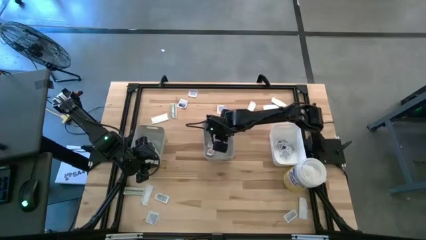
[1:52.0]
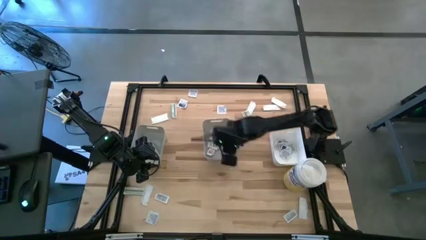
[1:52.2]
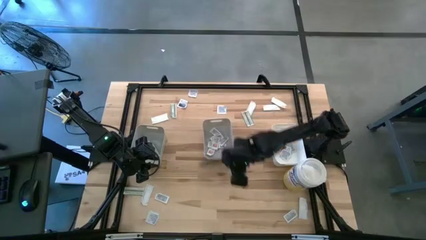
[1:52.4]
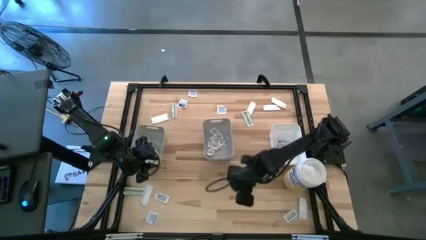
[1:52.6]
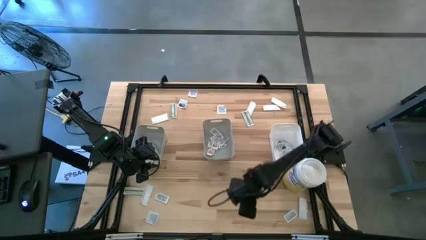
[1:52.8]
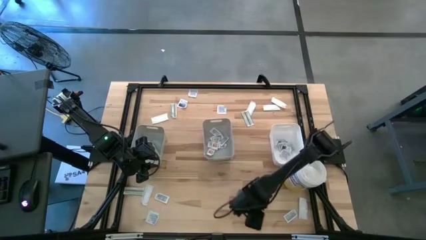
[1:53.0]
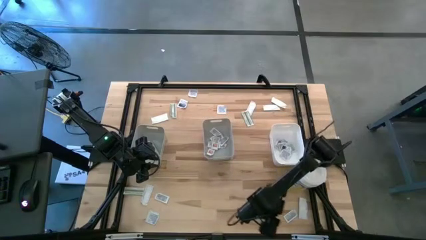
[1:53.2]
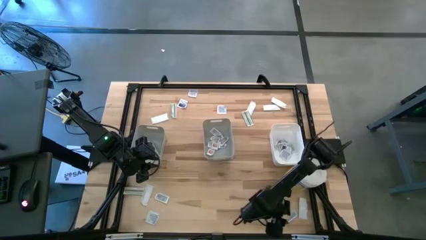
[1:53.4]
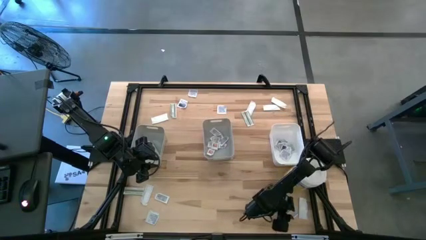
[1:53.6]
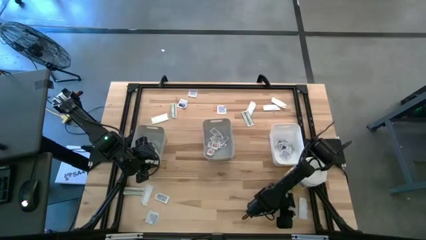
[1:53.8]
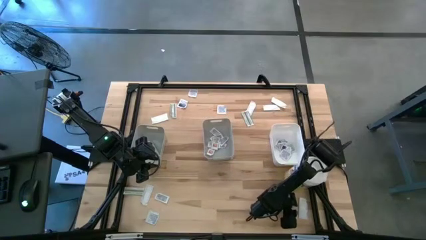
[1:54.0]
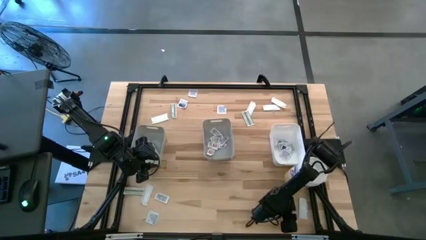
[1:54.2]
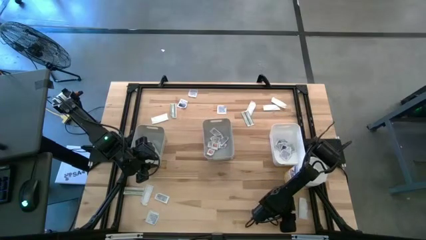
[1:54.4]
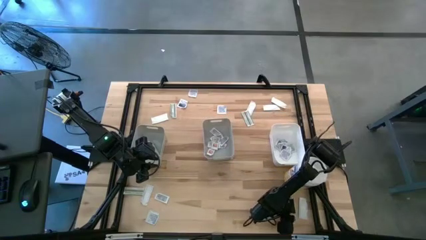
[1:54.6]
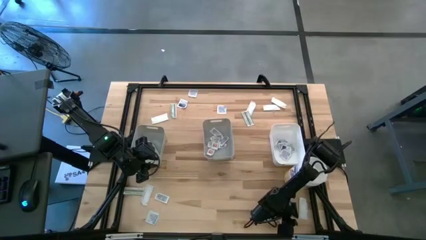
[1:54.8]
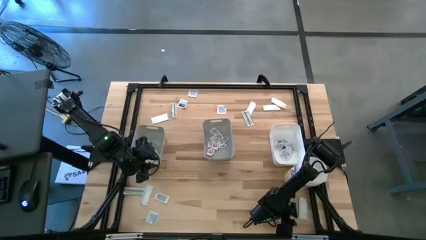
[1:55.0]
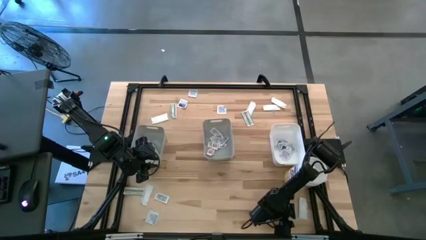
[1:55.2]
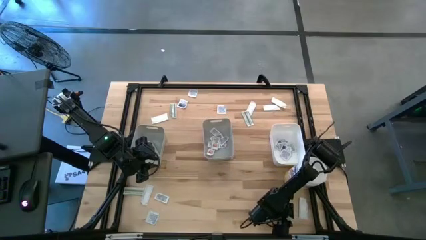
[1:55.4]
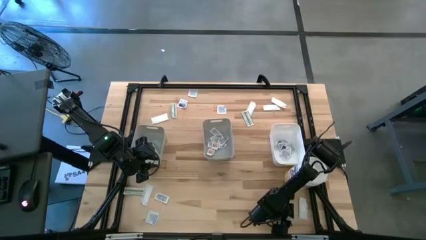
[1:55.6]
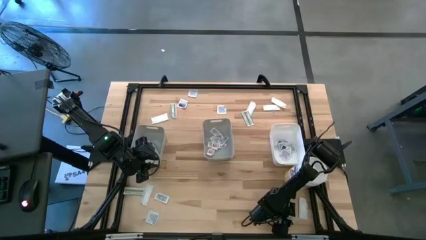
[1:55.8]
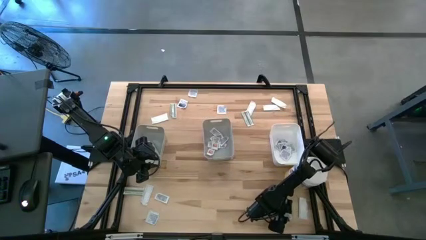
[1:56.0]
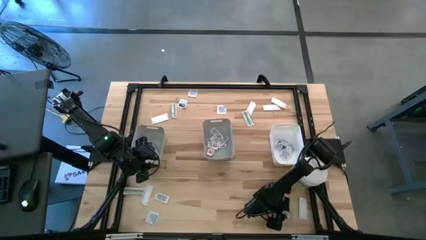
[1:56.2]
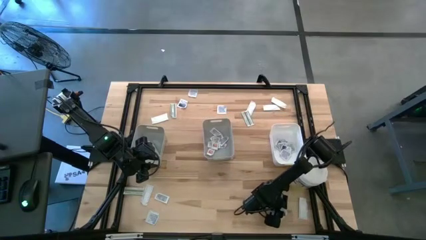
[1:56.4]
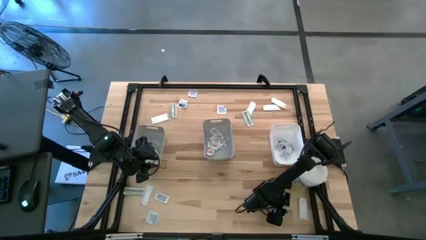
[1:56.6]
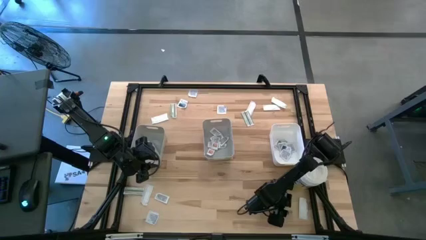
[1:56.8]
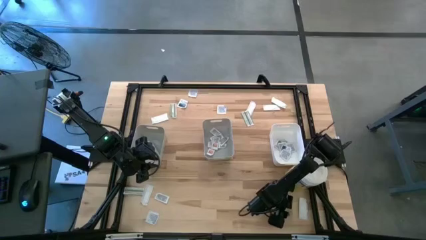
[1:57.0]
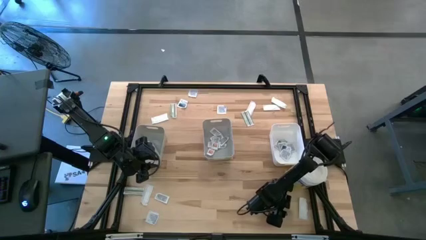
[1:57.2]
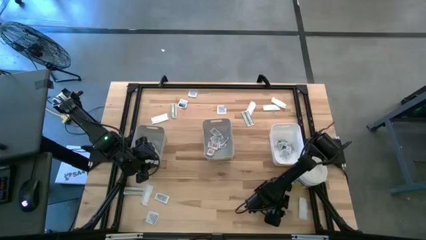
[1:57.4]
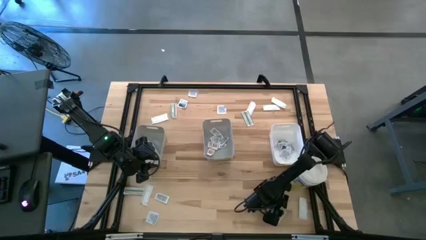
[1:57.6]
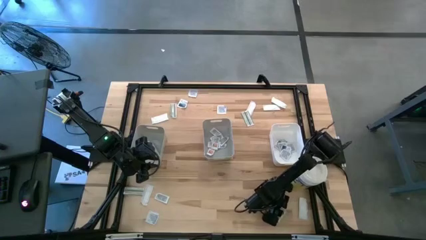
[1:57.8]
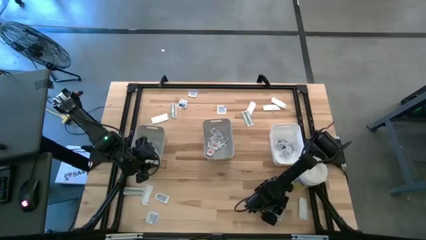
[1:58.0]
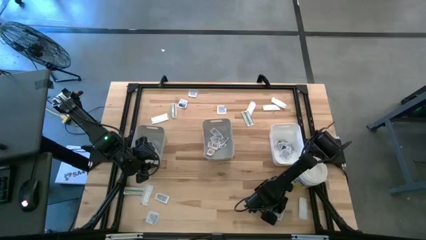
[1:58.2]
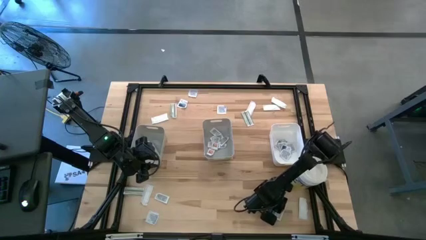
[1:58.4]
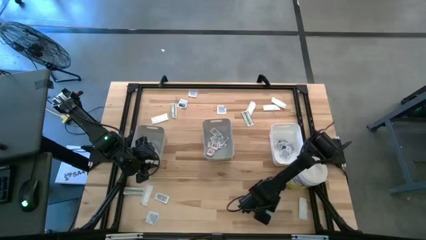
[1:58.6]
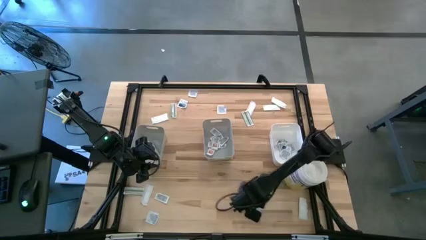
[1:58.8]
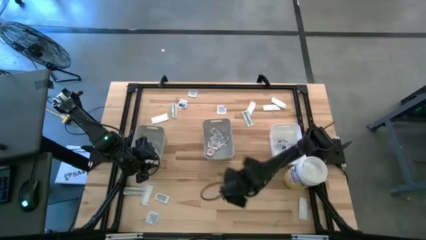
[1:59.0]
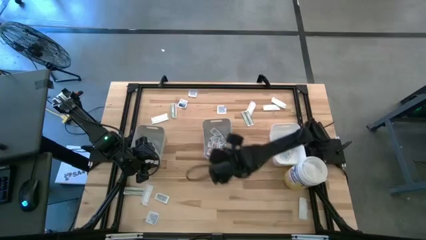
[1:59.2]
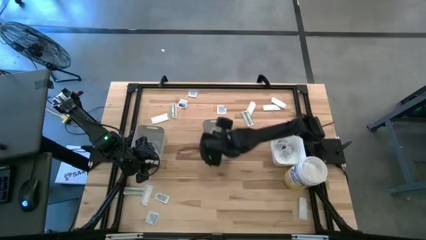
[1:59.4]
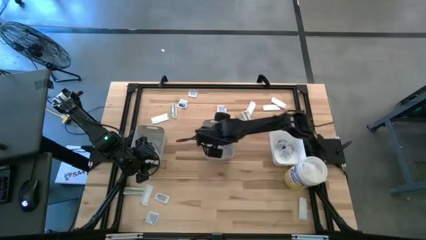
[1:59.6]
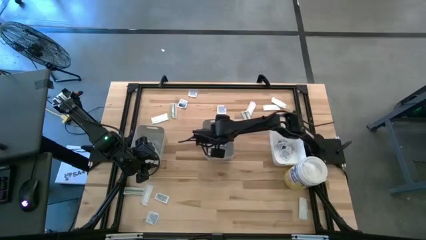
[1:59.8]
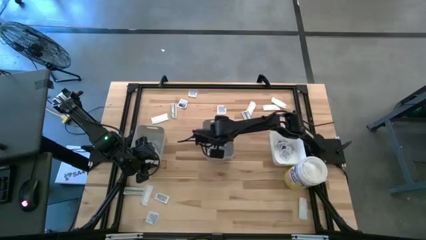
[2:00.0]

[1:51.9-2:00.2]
Task: Pick & Place First Aid Supplies
Put the ointment pack into the right gray bin

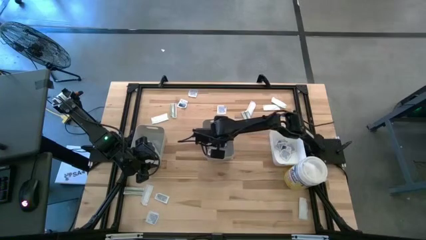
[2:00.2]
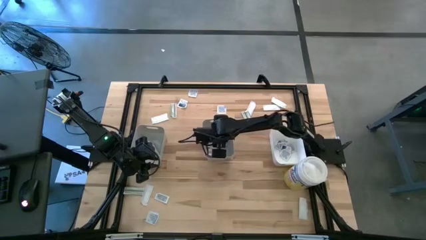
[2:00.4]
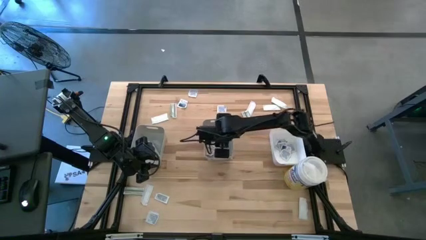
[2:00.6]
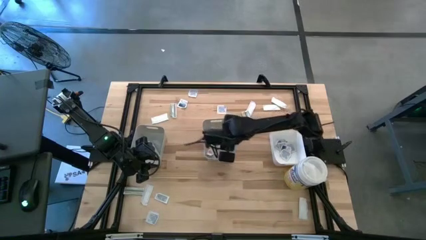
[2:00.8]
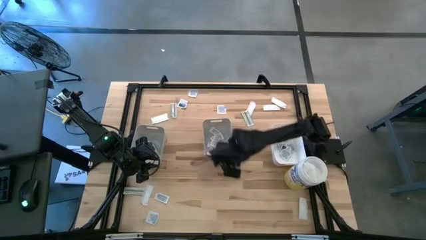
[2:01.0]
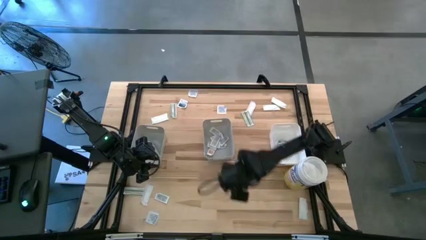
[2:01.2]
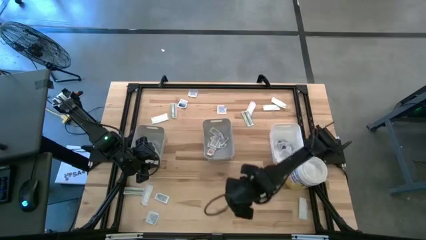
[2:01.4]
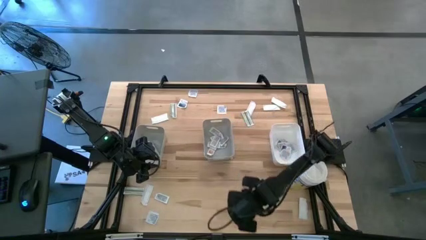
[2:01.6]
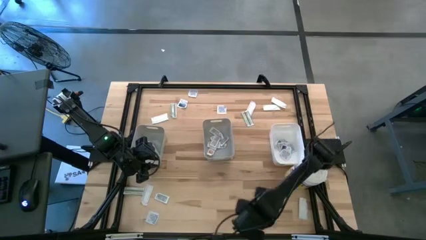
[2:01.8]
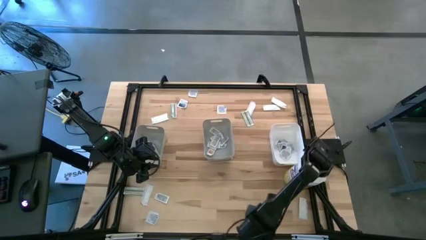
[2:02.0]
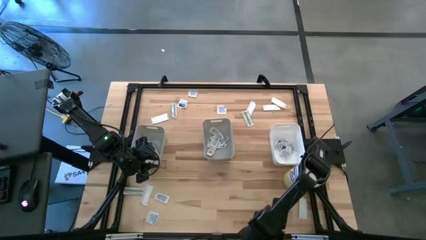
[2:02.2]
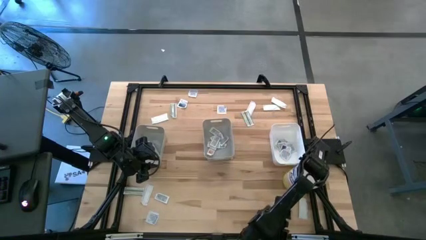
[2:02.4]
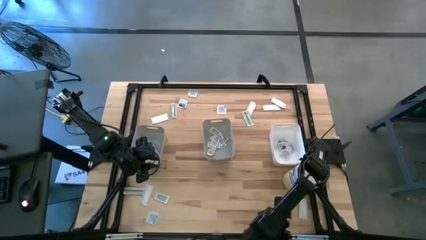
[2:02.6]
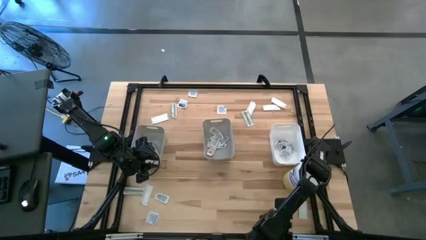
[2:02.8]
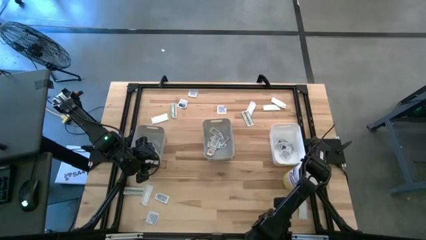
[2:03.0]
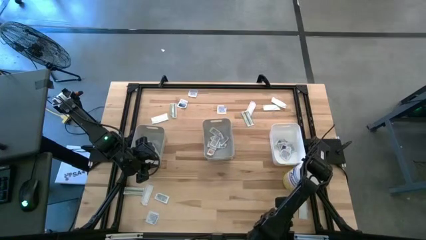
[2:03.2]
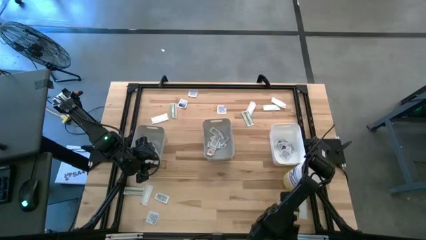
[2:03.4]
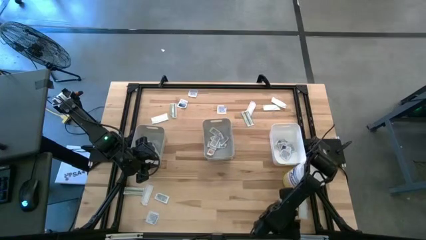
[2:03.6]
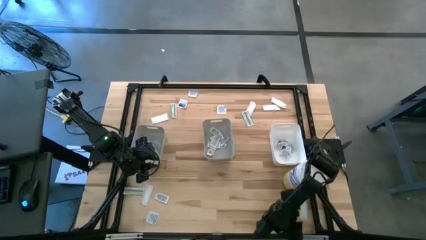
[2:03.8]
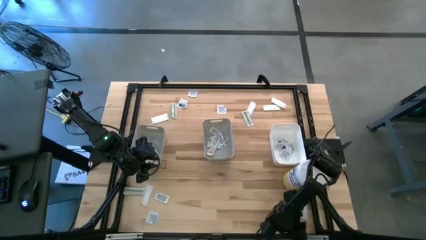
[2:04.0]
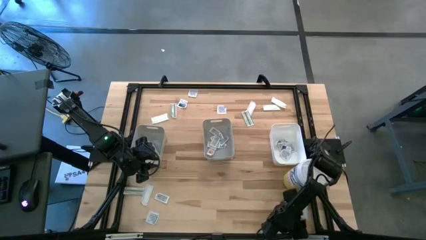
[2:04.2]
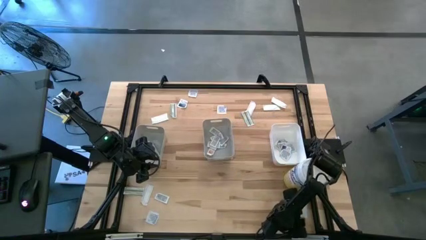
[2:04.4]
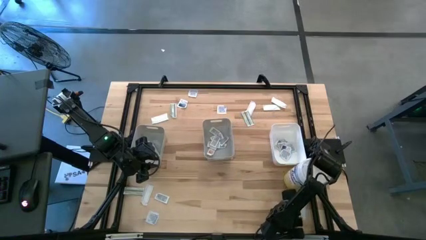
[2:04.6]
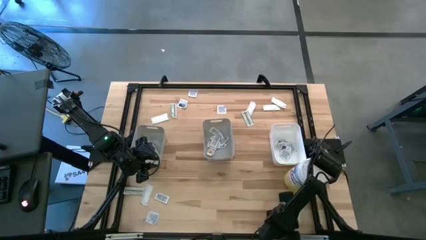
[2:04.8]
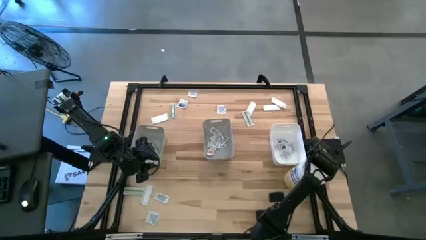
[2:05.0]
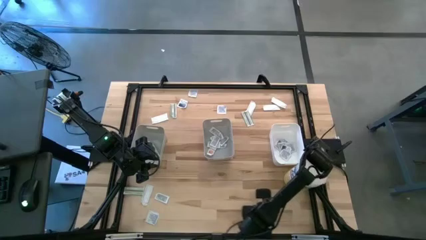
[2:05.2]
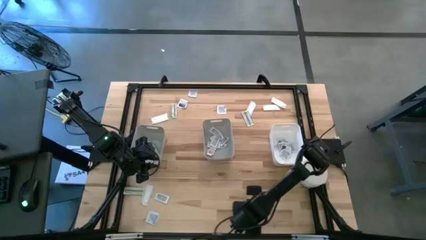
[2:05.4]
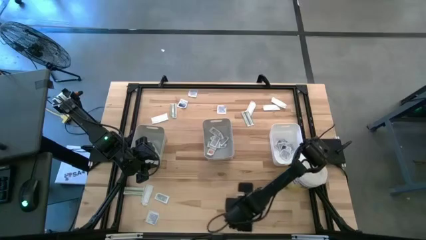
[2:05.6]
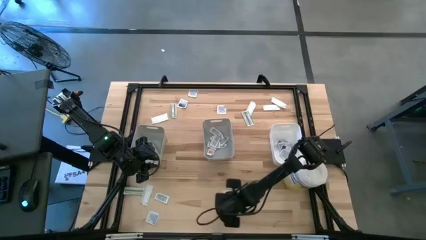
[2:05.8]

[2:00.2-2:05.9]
Put the bandage pack into the left gray bin

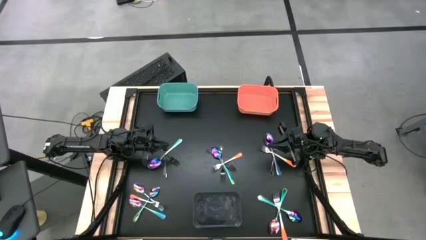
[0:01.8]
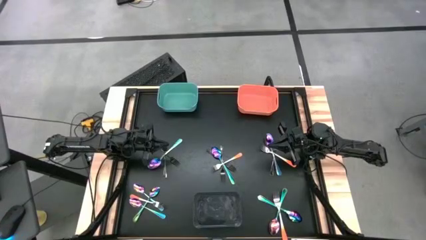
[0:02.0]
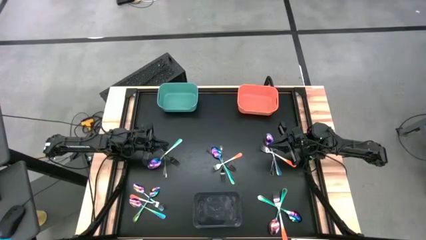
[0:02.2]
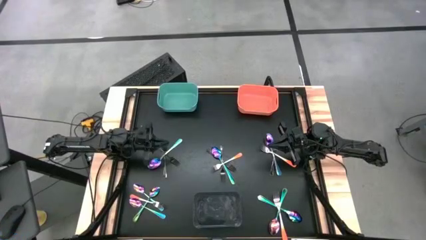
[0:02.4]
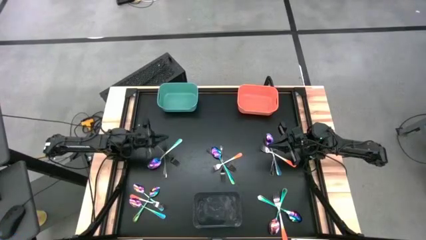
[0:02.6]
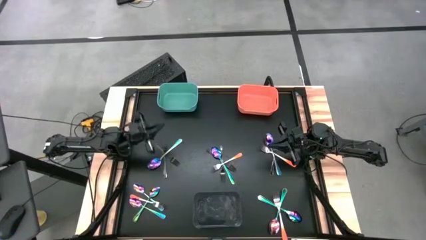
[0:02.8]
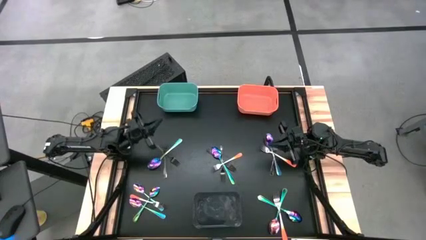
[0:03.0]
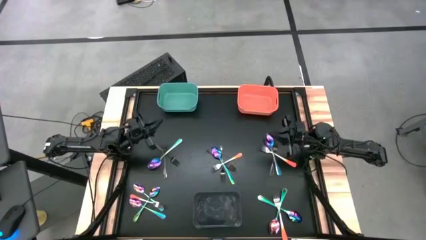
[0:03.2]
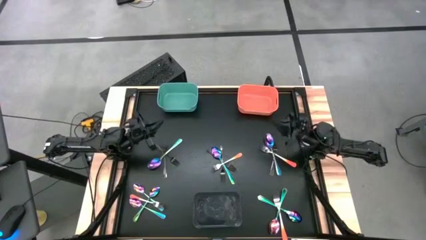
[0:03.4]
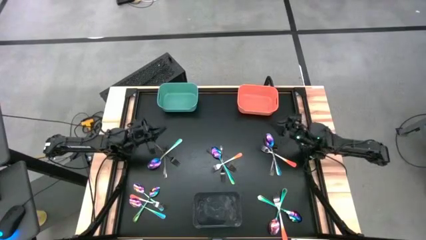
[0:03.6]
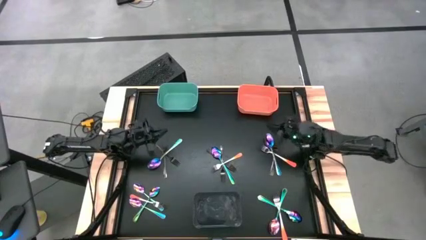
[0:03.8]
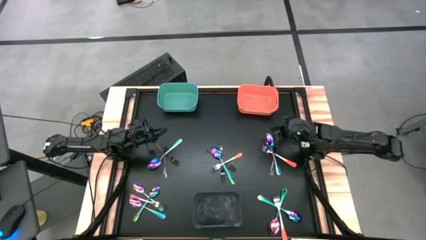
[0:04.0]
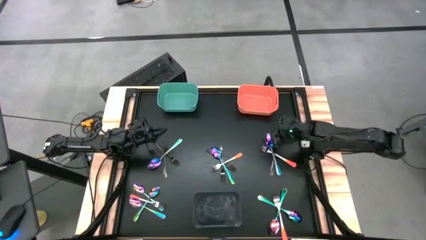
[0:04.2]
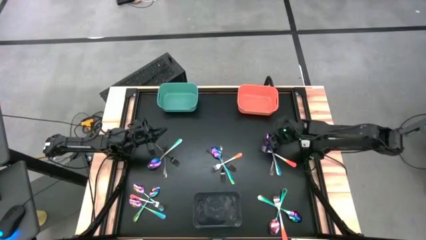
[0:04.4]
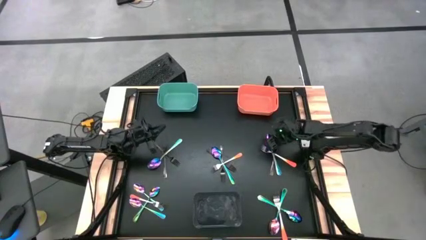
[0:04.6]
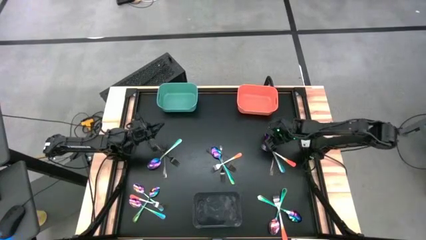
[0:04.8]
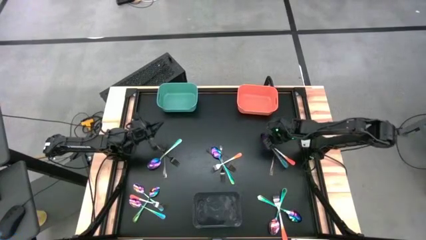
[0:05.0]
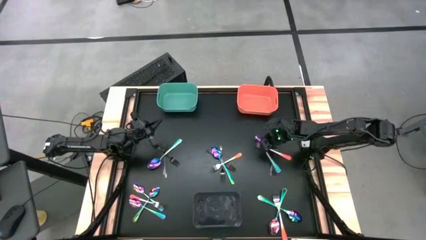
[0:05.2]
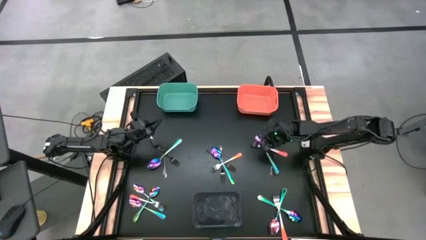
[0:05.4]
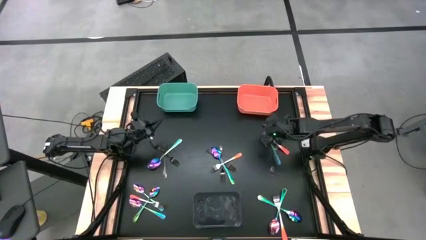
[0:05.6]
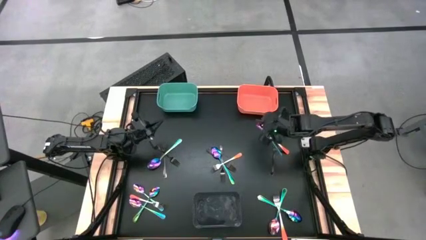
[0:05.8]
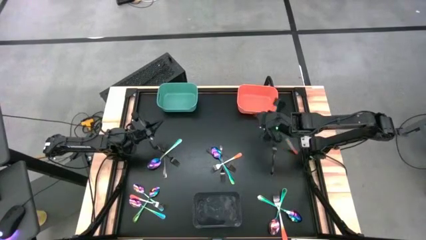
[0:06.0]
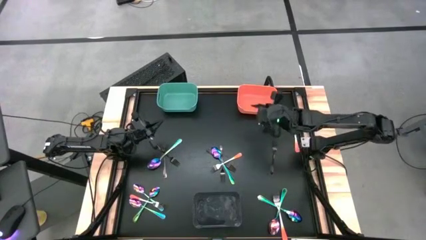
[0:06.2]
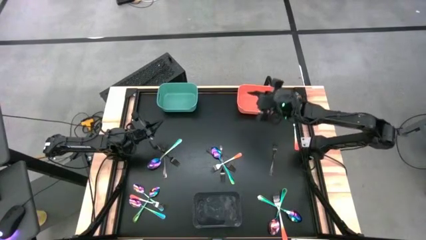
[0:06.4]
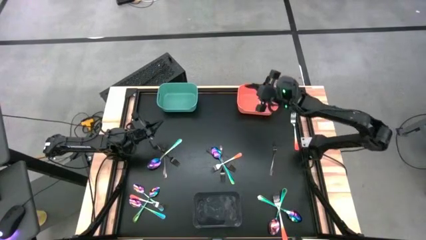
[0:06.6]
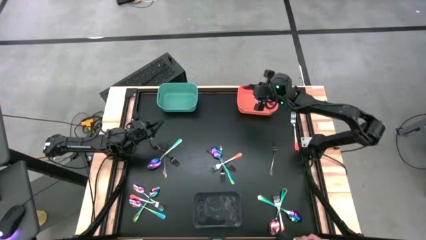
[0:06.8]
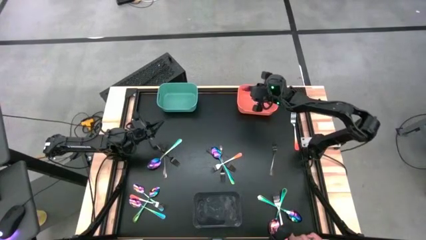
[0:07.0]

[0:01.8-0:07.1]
Task: Sort silverware by color (type)
Put the blue spoon into the orange bin
